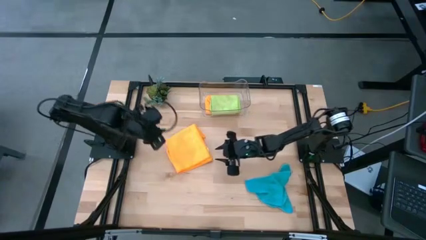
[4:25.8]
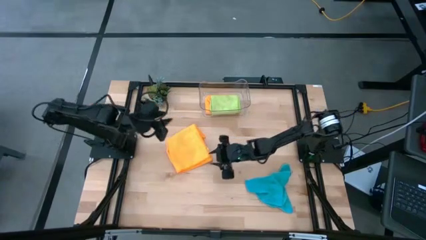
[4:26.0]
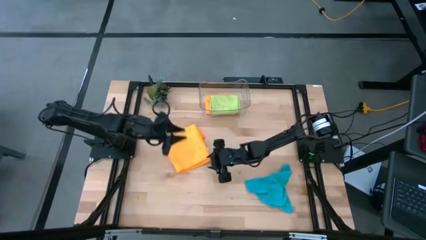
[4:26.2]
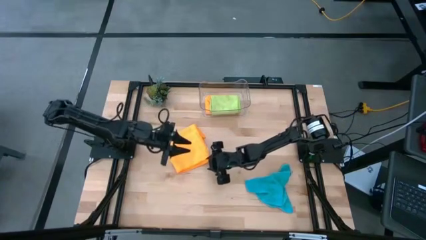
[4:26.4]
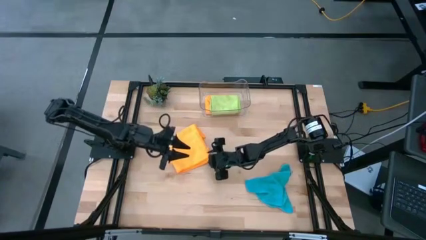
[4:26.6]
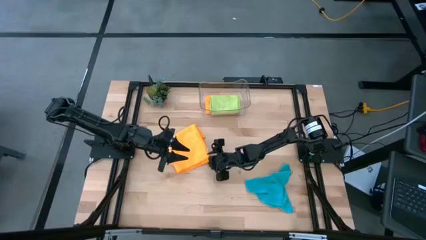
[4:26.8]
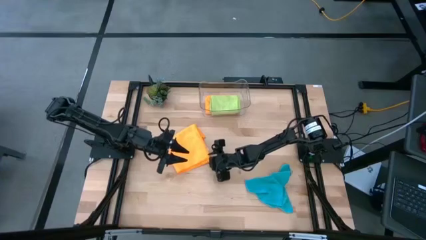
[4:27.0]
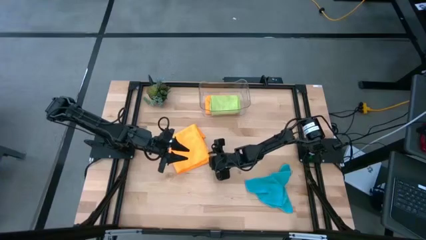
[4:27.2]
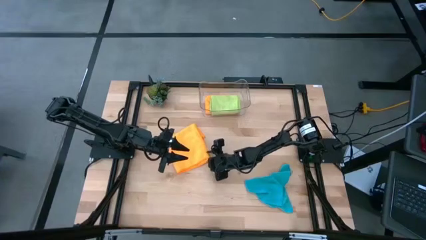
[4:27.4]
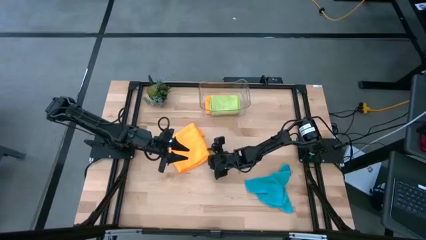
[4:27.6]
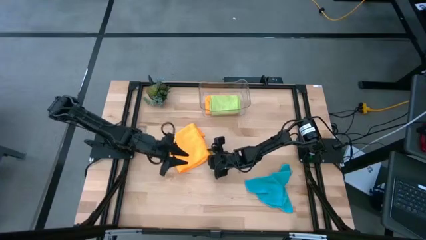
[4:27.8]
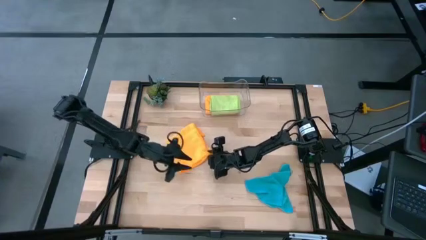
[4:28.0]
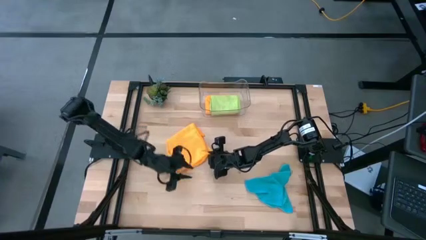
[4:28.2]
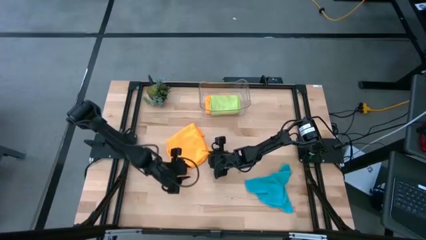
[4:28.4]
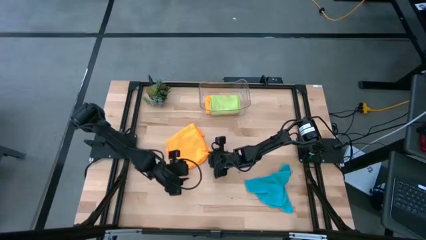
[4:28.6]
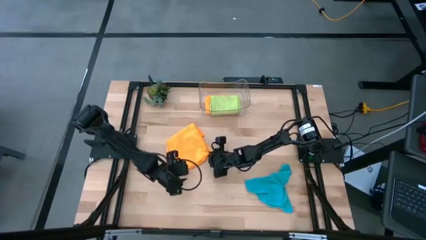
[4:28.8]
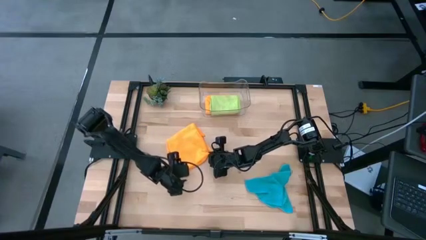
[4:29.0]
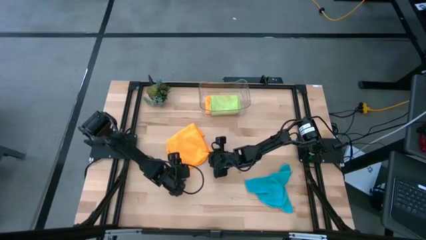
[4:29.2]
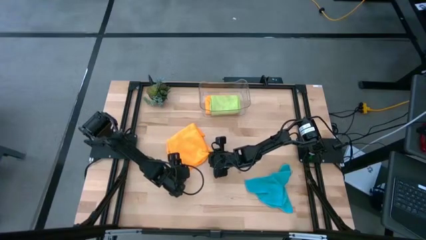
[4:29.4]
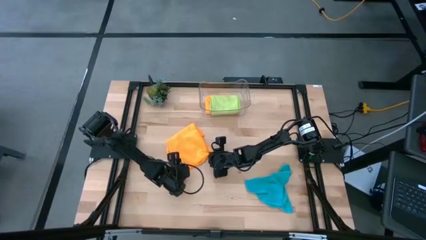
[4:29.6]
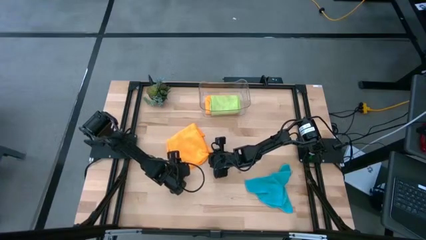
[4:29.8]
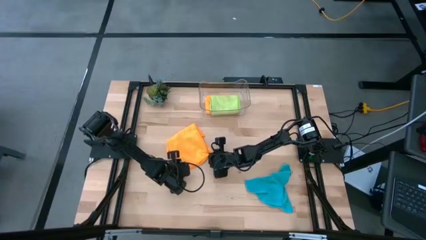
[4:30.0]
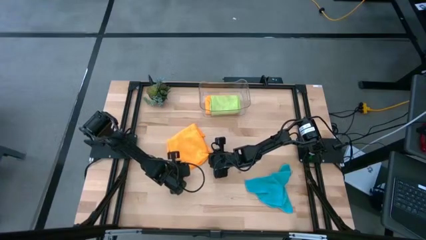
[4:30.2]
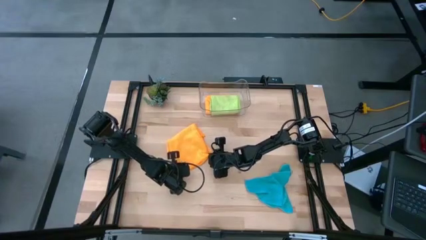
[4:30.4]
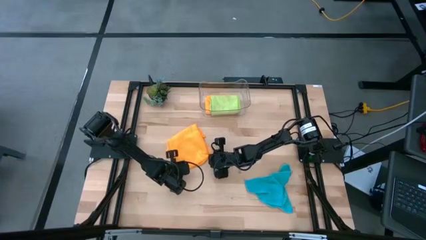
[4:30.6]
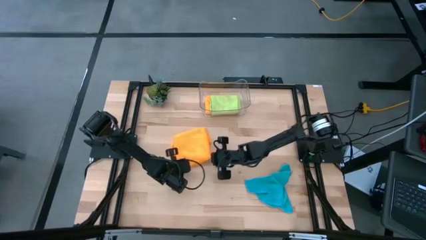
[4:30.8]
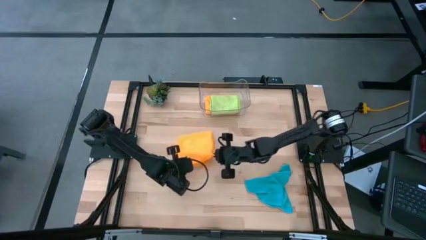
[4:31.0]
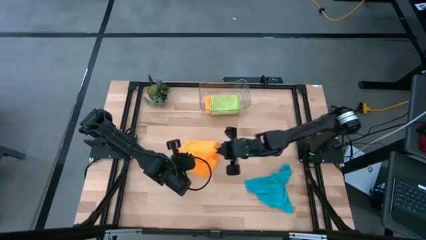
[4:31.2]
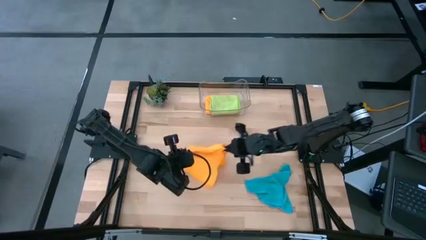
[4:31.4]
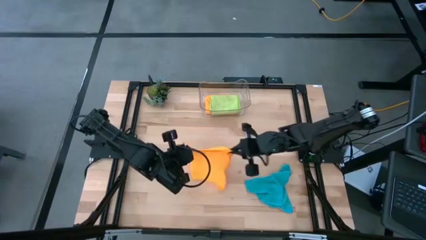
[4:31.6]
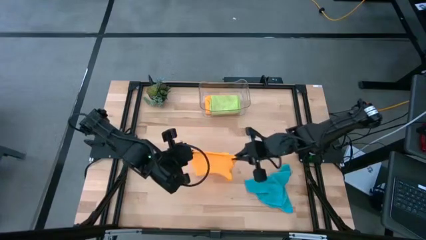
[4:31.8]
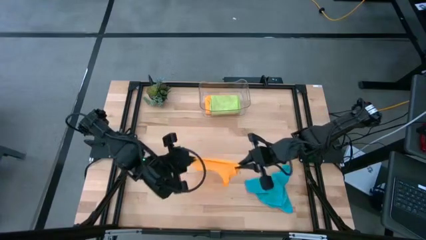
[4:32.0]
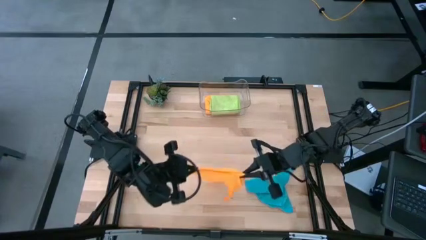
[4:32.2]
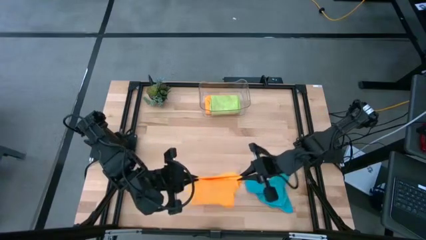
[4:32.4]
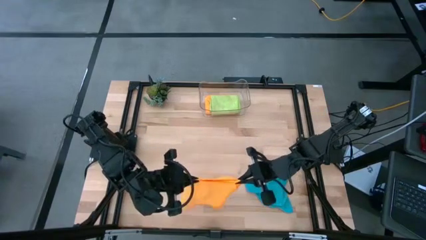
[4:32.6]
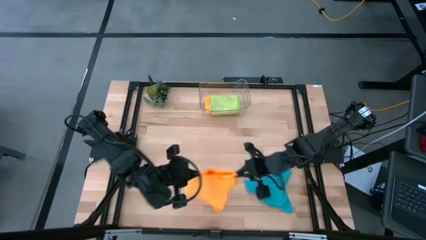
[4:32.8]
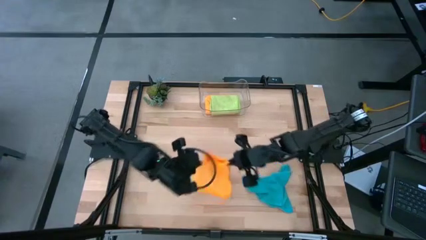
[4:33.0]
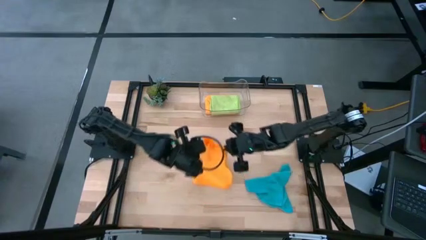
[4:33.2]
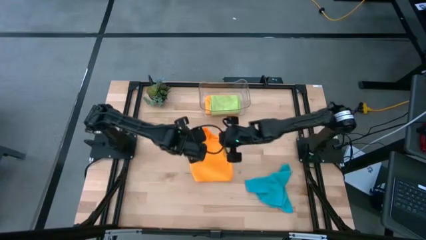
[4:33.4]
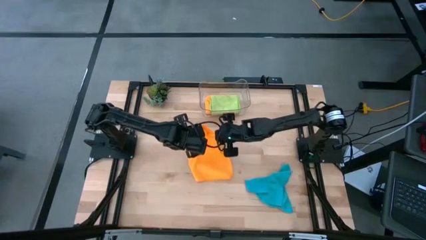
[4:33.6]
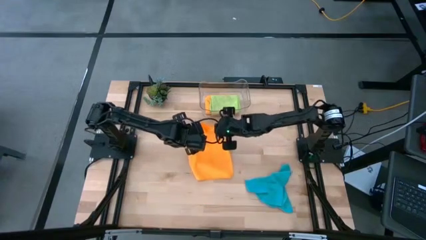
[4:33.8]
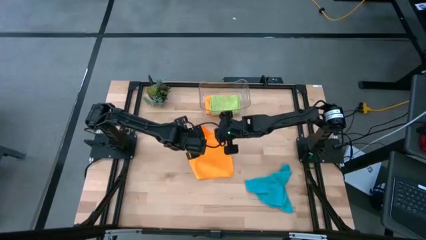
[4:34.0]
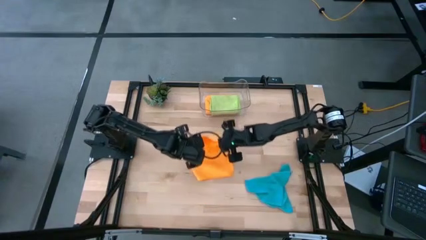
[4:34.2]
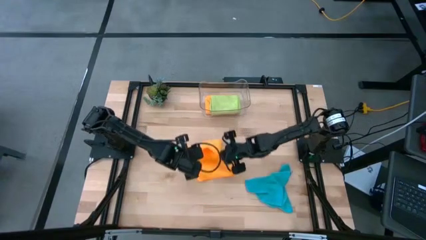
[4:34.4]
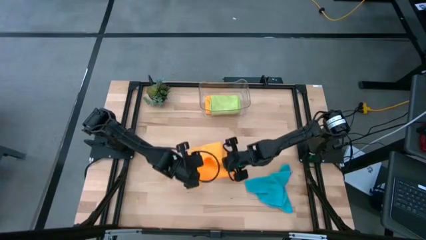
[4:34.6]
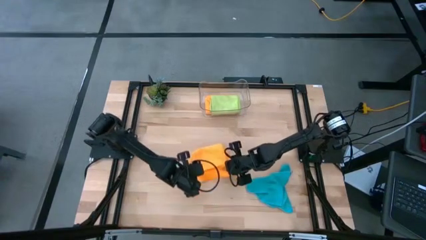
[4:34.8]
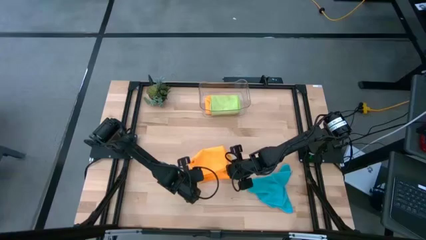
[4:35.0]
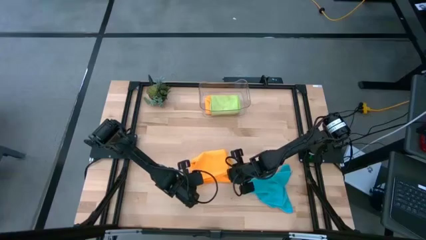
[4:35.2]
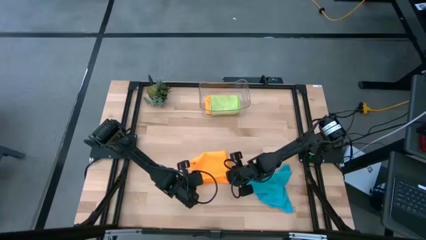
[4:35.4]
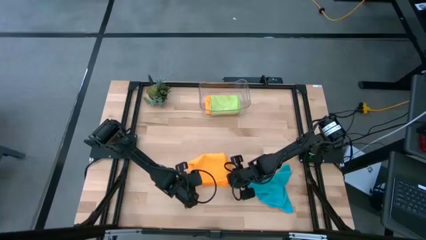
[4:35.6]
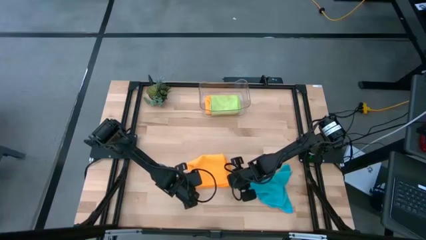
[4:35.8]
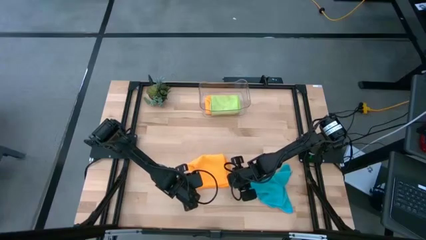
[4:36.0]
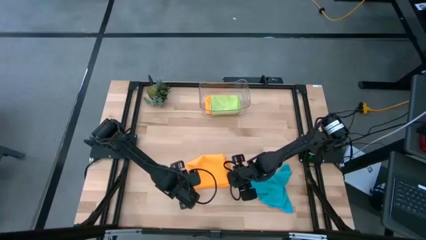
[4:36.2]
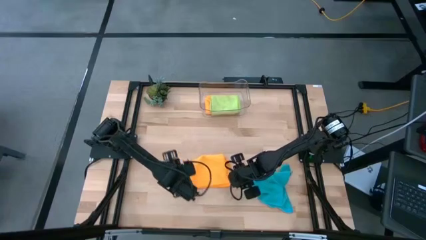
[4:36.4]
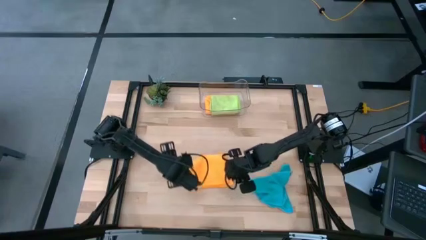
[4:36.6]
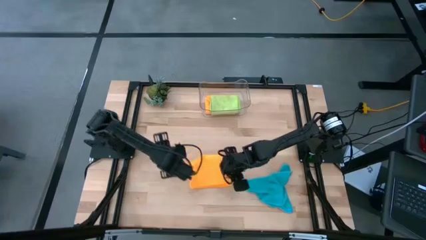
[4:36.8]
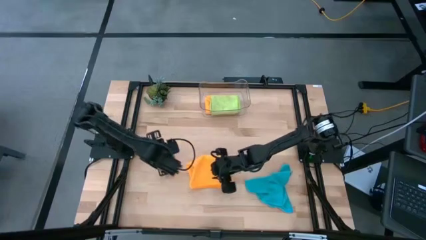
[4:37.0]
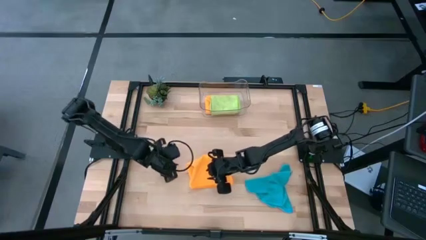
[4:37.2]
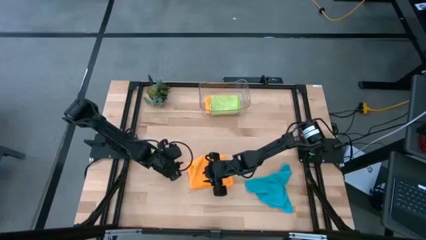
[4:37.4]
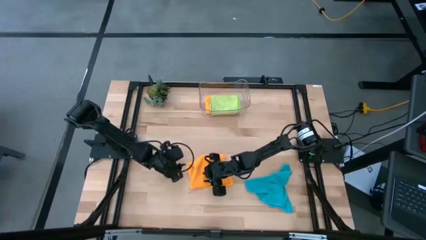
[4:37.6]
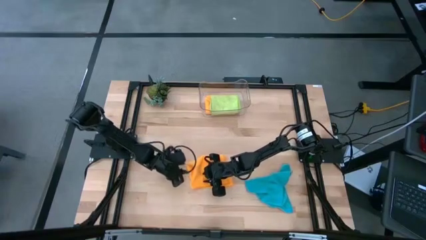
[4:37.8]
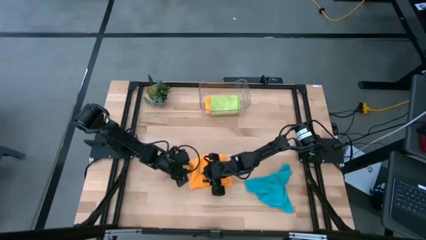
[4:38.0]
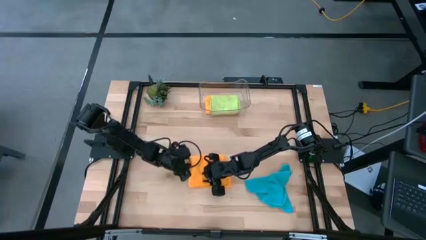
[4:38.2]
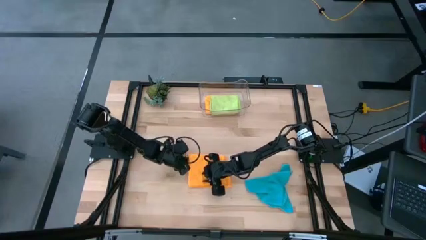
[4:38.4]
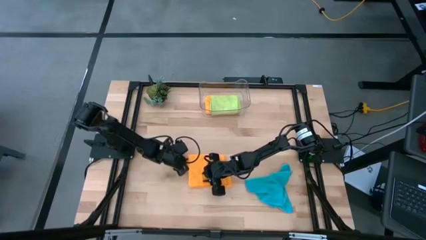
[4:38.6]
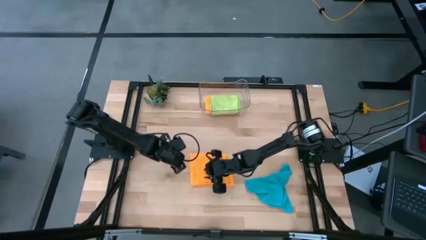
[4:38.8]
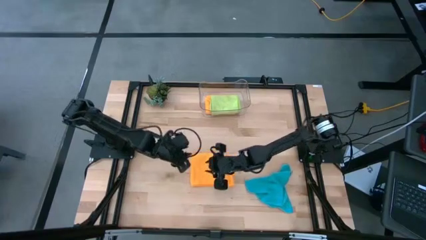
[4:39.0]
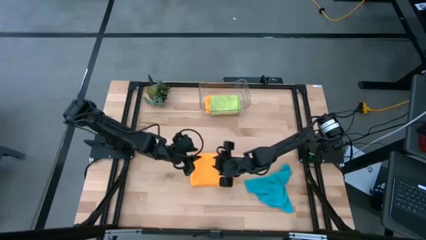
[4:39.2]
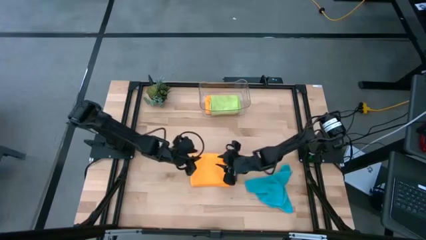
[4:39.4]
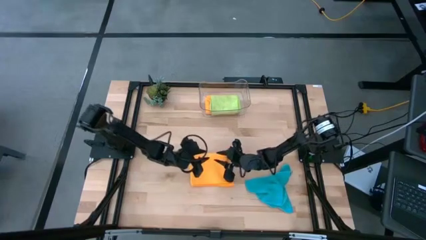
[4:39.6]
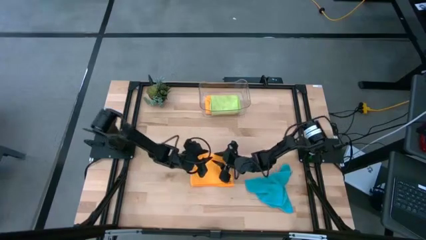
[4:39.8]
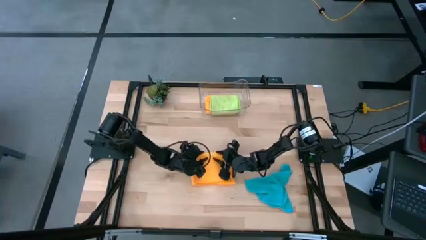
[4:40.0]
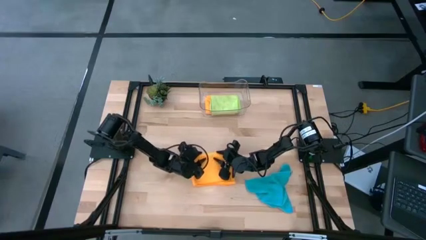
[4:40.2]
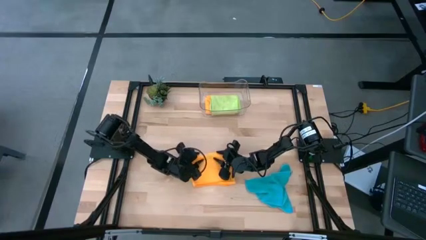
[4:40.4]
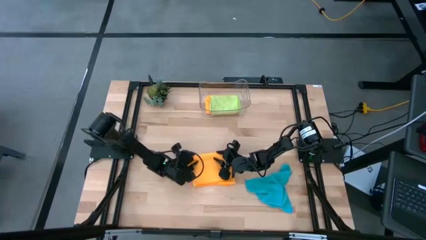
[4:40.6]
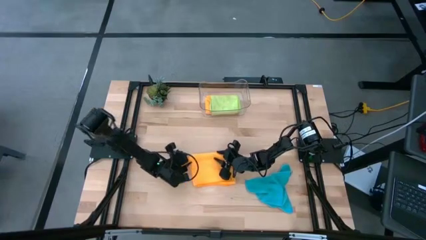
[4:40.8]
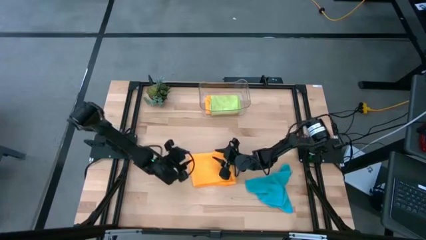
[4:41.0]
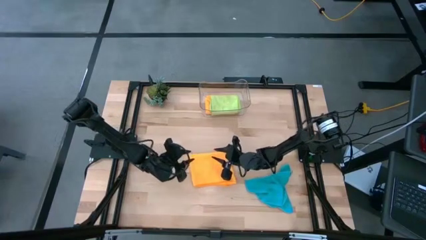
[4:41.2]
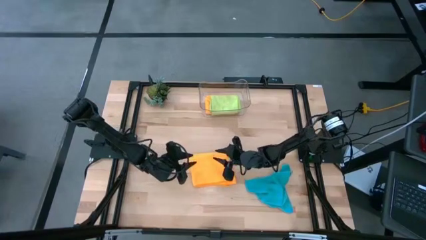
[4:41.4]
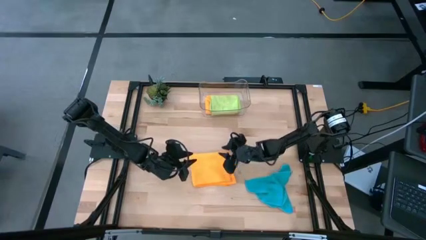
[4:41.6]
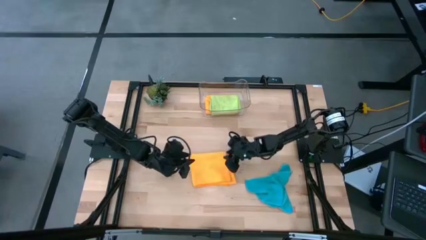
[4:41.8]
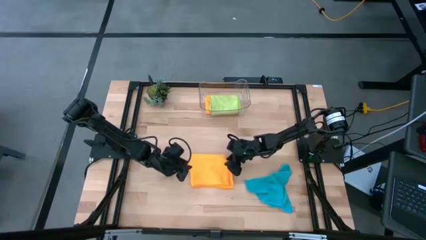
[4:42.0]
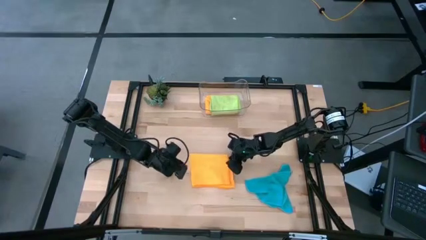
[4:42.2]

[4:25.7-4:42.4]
Task: Fold microfiber towels
Fold the orange microfiber cloth

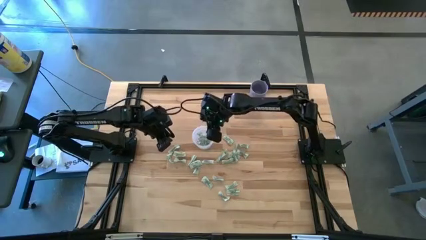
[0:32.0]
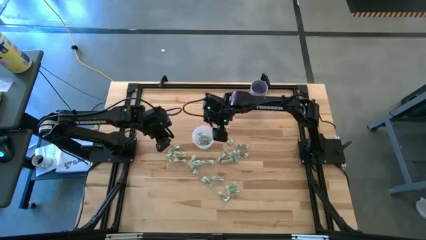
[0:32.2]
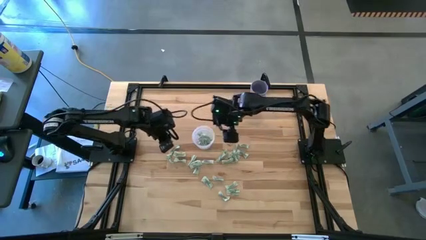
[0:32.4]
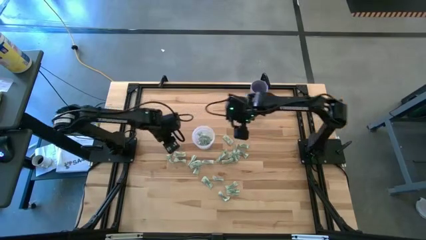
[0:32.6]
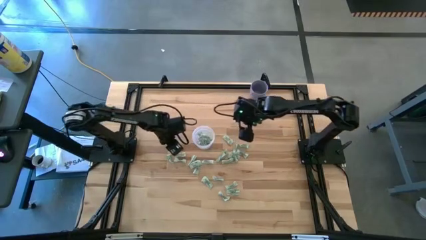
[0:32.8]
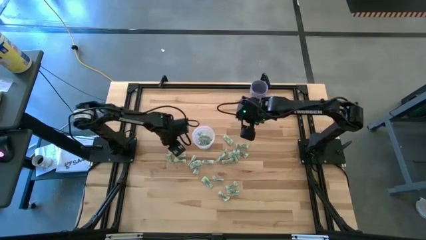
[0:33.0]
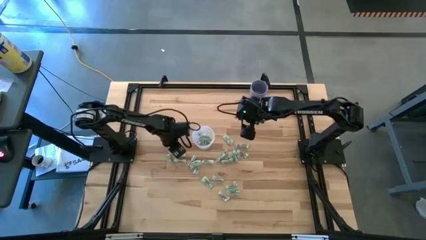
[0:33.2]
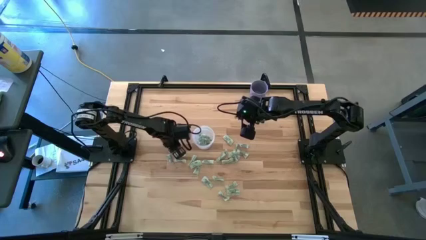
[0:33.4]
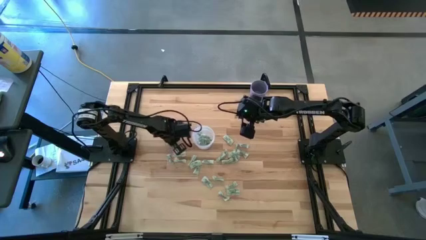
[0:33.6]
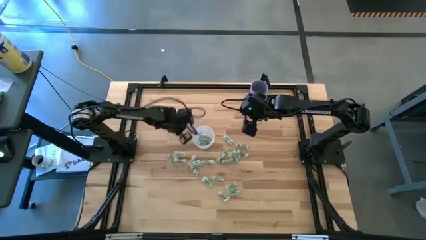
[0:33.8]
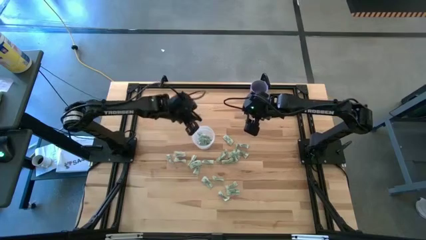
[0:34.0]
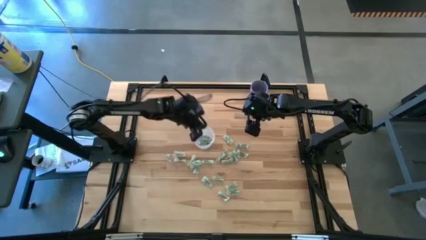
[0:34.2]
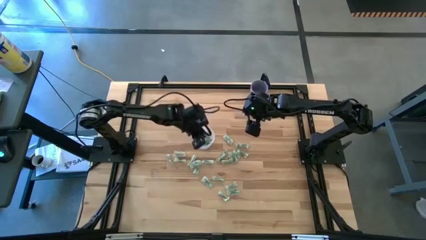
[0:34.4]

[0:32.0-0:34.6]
Task: Pick and place Stevia / Truvia into bins
Put the white stevia packet into the transparent container
